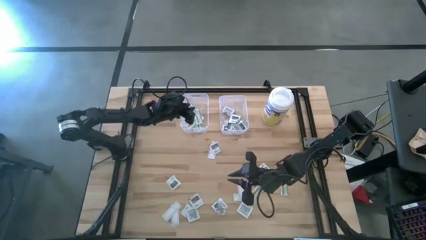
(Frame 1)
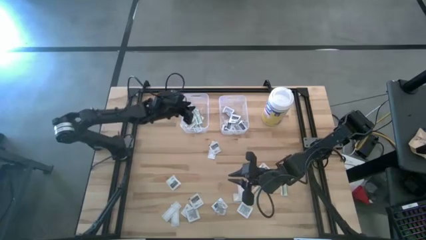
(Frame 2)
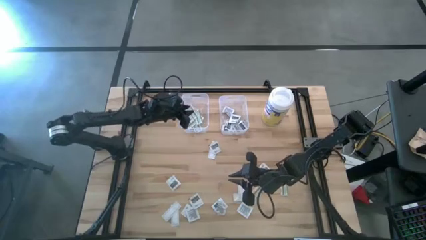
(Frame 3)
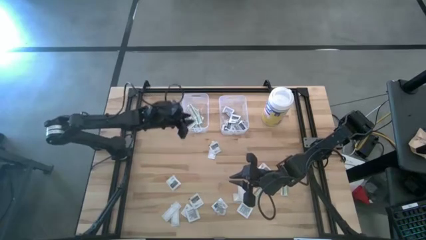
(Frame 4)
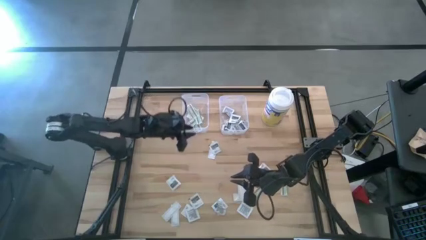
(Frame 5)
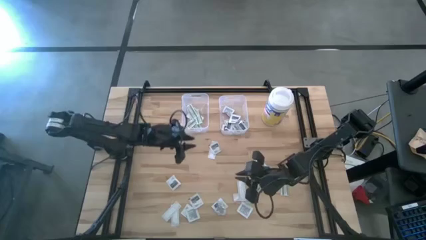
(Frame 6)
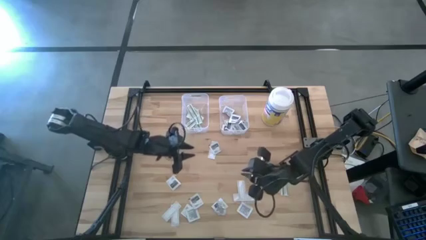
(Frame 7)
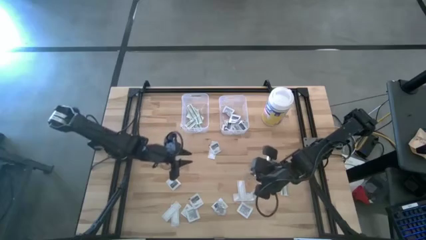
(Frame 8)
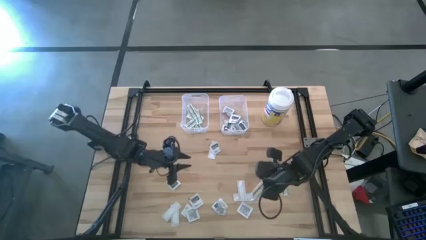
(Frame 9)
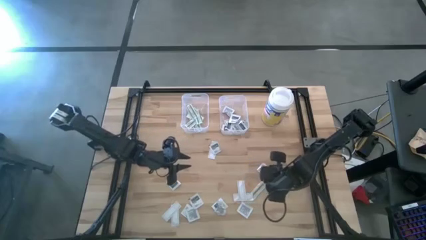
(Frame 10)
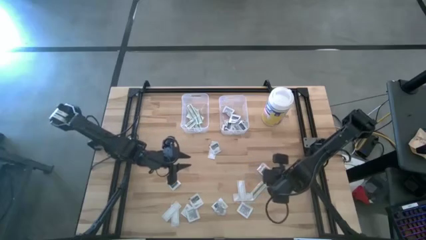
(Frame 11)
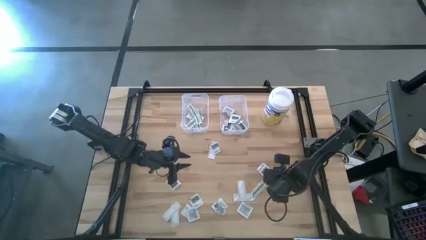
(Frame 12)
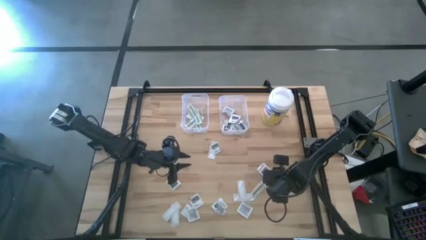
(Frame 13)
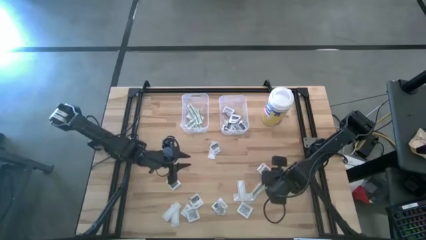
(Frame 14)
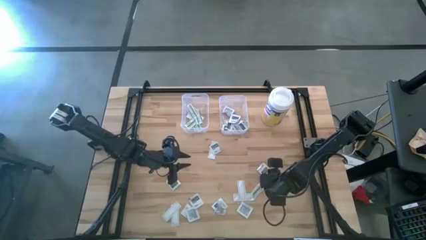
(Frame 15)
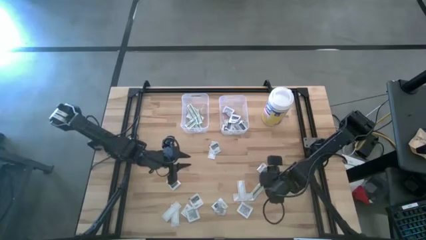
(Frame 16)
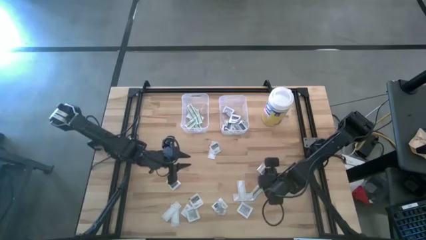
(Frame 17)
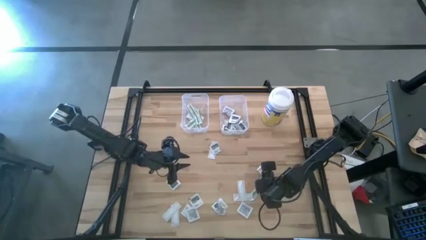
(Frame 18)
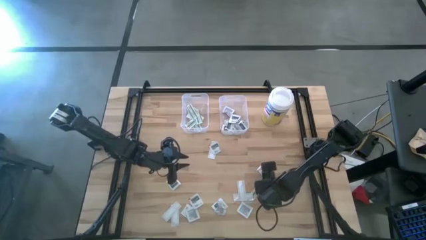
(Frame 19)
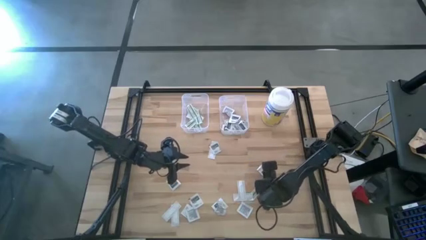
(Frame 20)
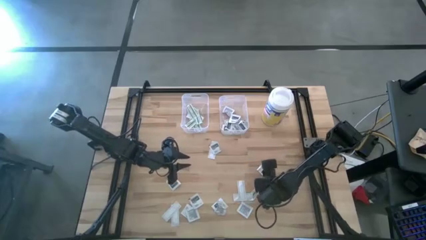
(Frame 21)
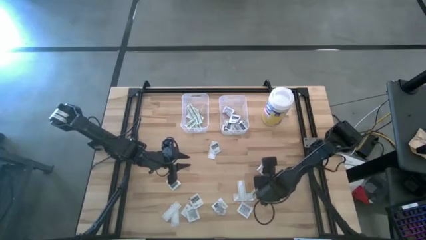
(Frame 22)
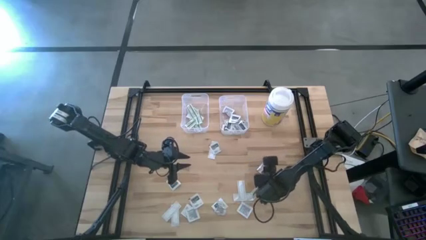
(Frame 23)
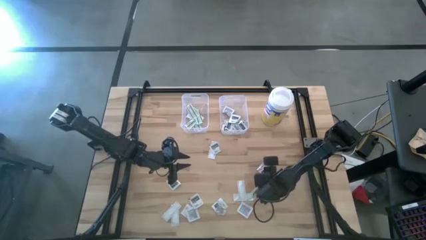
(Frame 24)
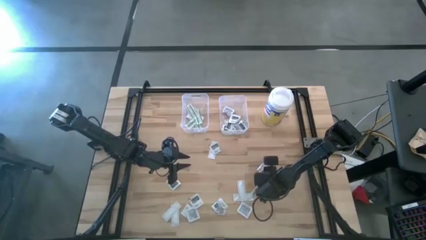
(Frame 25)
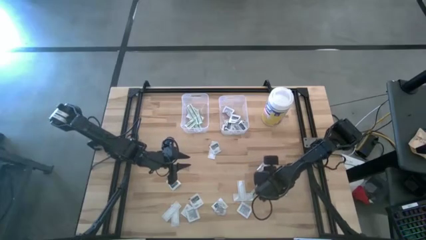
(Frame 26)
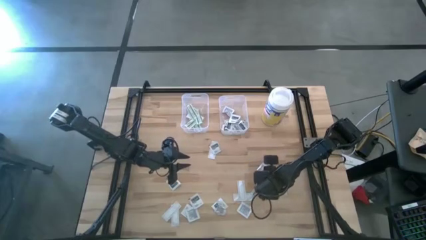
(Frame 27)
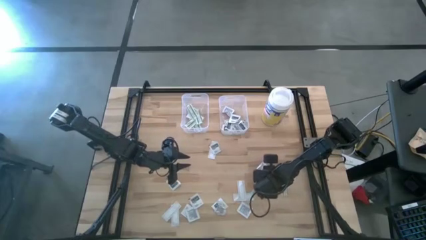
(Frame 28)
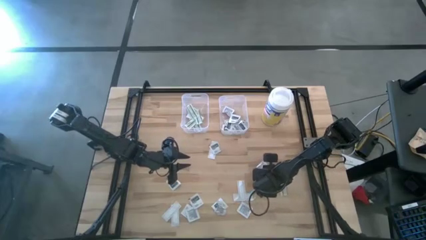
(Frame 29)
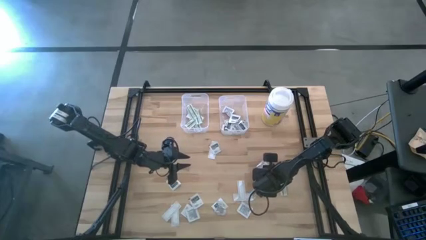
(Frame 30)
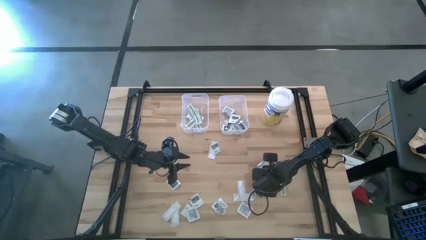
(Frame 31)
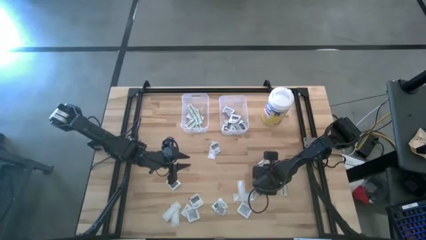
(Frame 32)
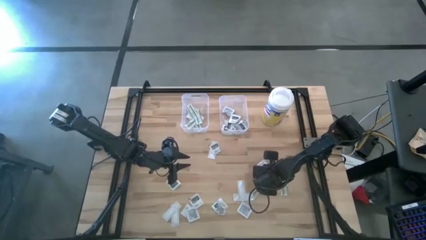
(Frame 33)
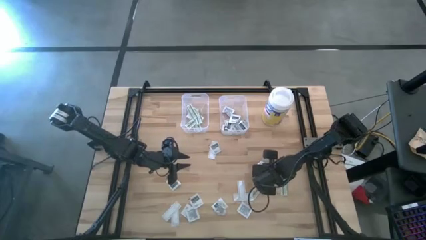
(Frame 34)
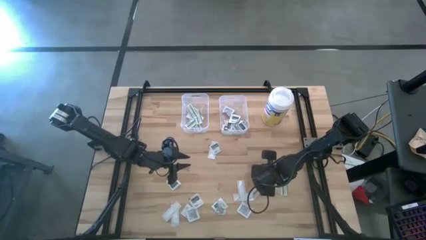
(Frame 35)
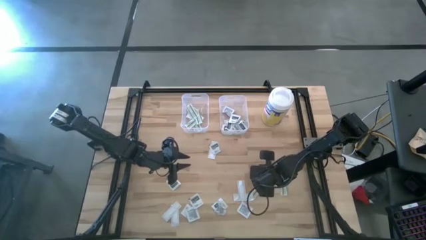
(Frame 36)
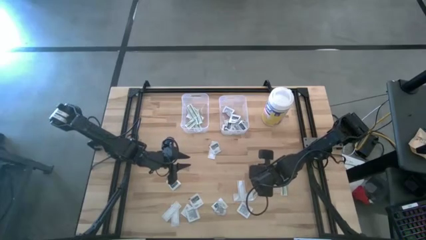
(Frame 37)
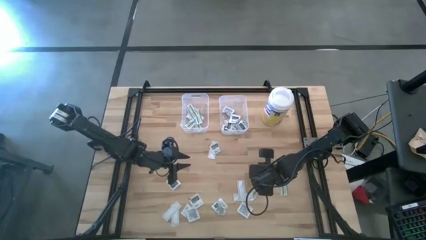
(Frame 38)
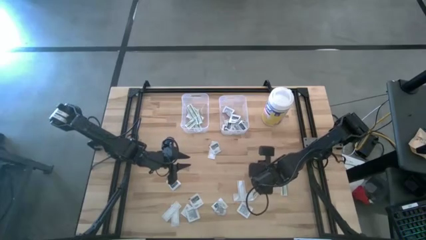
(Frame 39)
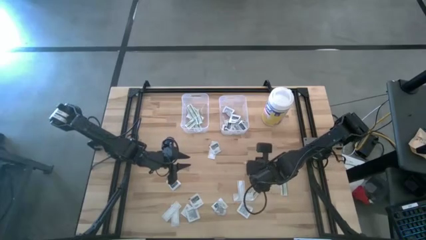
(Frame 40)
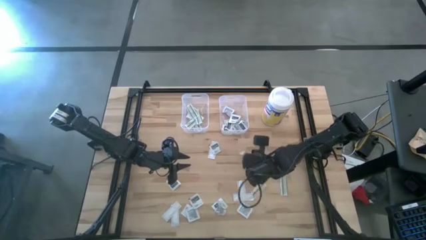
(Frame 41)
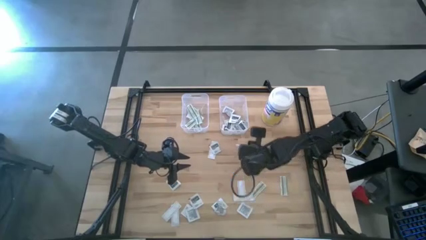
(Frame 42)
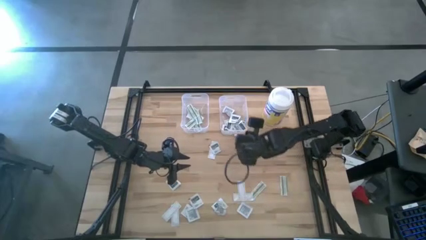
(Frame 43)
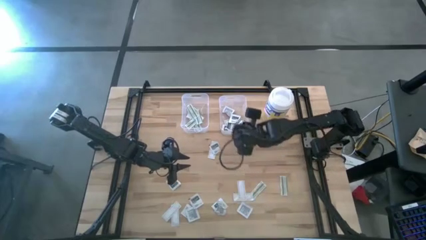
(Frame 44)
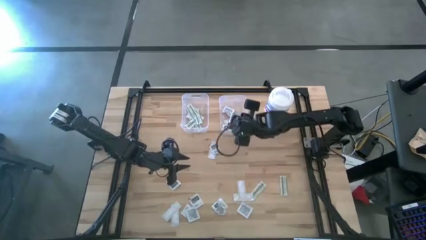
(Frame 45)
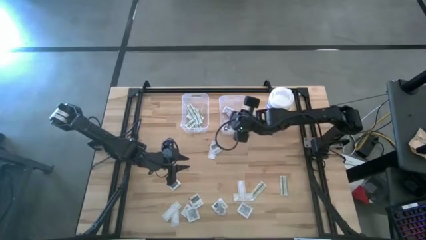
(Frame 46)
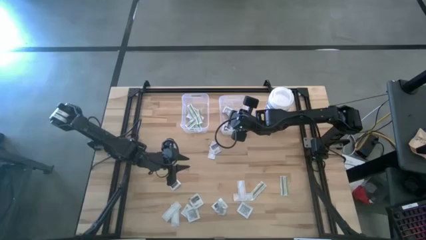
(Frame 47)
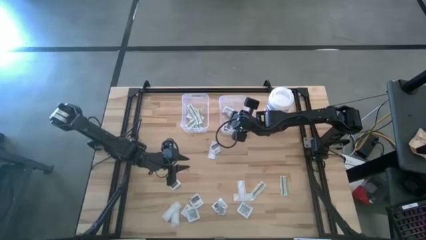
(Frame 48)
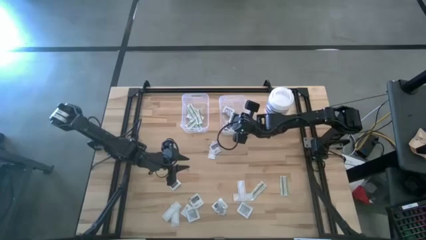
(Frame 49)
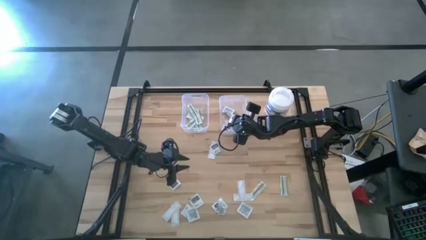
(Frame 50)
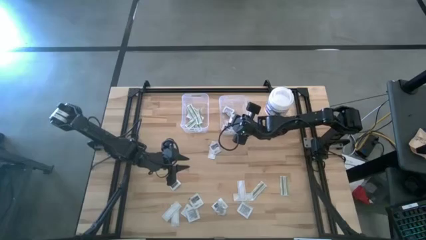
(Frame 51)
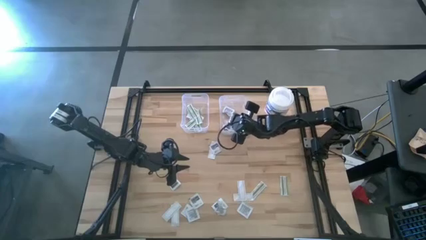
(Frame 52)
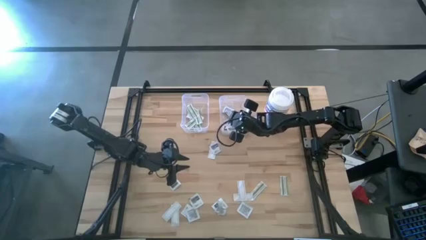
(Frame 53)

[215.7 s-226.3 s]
Task: Pick & Place First Aid Supplies
Put the gray towelette pack into the right transparent bin

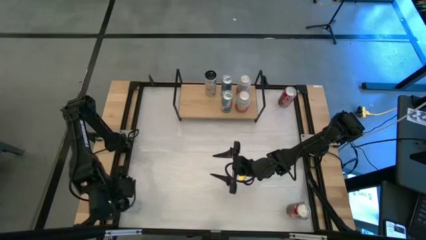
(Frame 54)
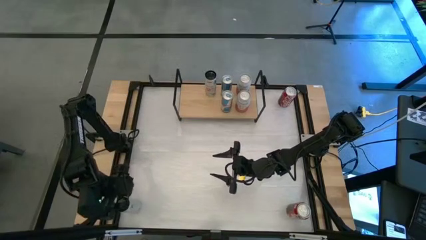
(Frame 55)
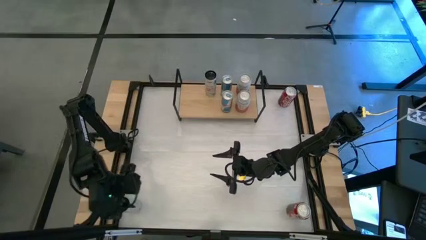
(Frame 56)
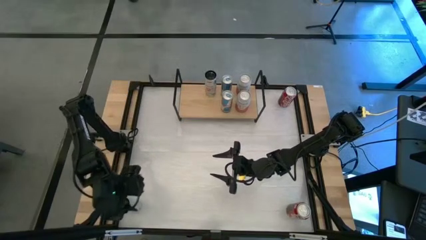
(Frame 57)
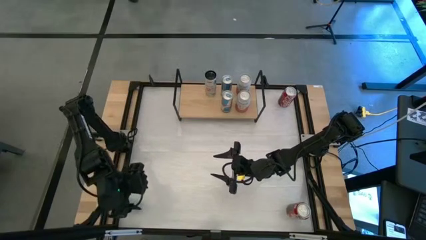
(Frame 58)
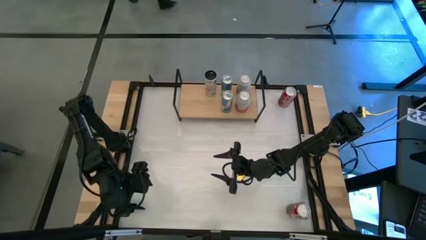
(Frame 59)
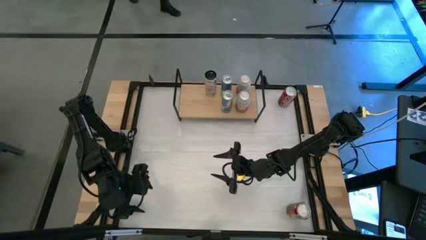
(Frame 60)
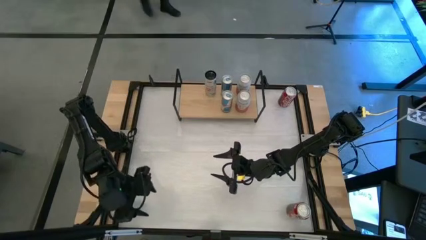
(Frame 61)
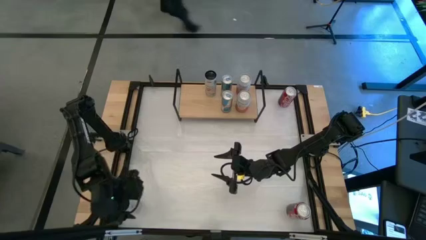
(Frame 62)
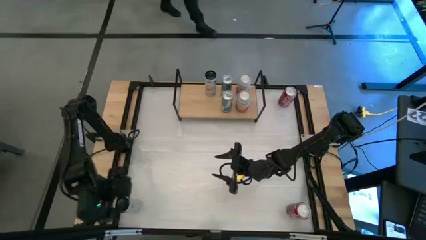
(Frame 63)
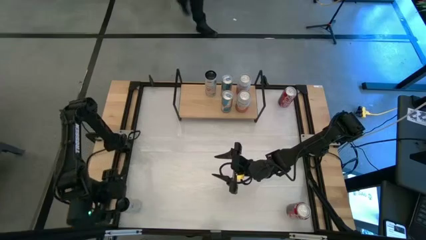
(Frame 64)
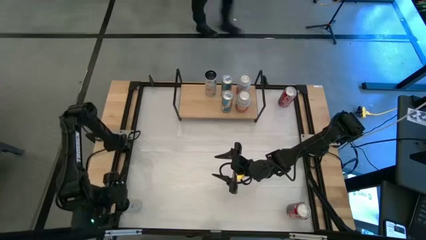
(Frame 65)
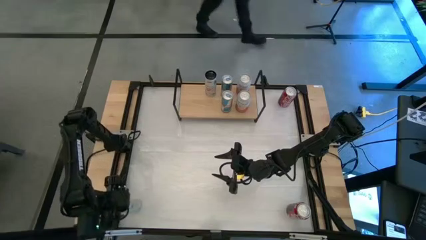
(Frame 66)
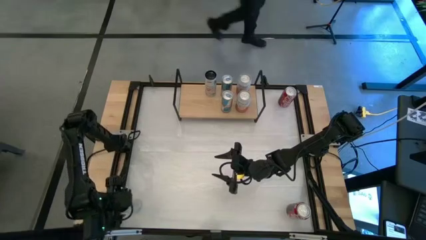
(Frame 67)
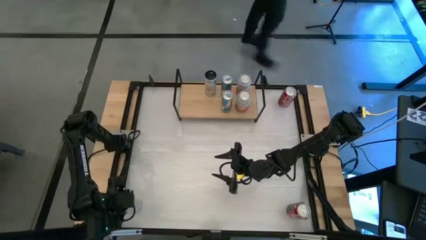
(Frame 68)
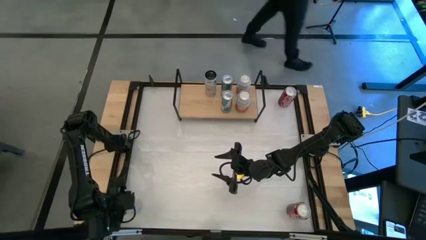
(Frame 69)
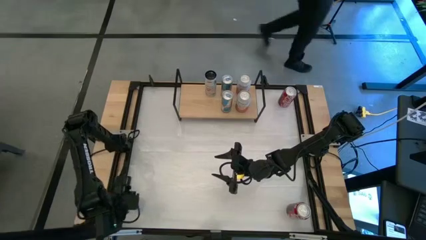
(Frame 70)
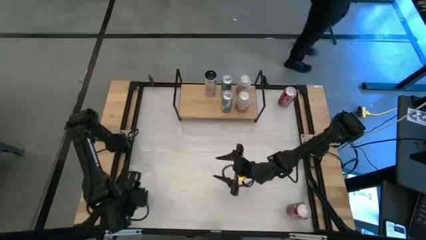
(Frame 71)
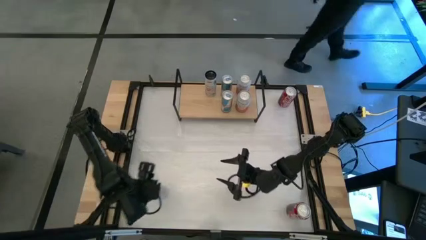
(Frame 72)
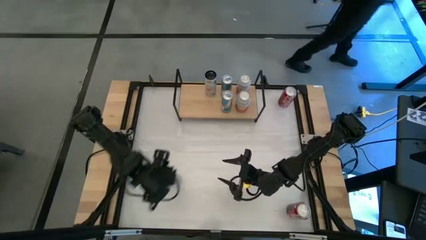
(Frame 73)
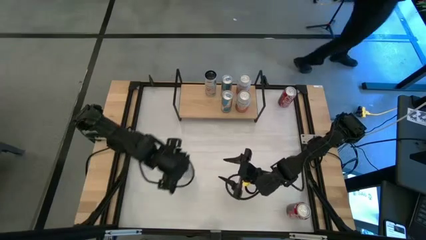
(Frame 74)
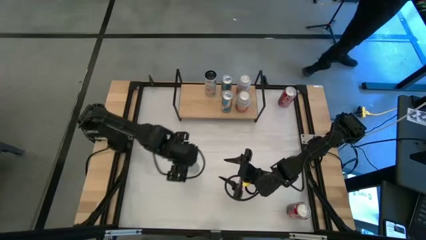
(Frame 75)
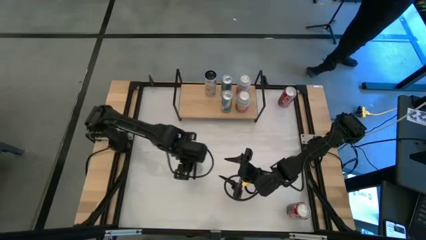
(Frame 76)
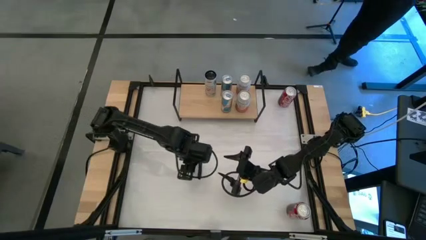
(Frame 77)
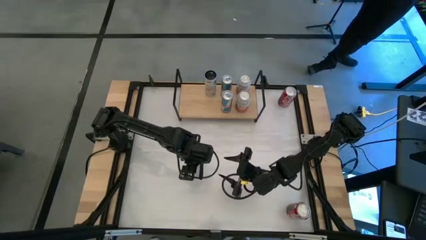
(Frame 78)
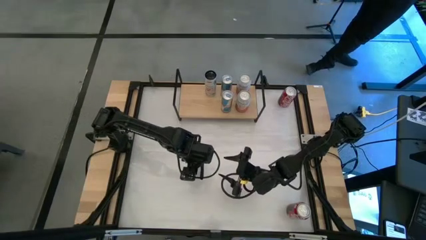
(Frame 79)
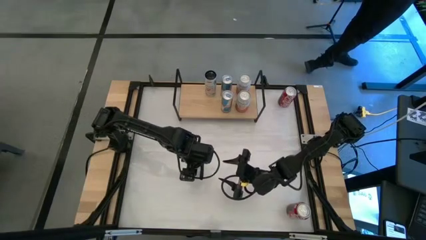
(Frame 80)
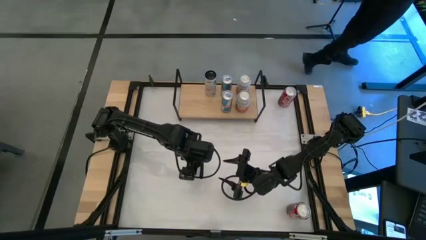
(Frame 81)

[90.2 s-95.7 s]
Task: Place canned beverage on shelf
Move the white soda can to the center of the table
